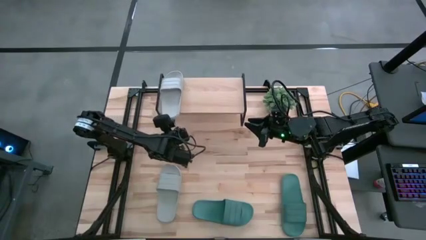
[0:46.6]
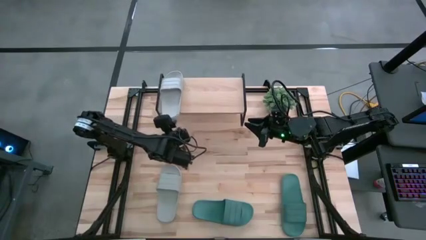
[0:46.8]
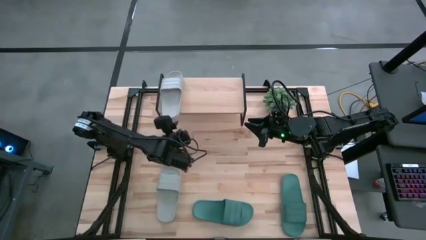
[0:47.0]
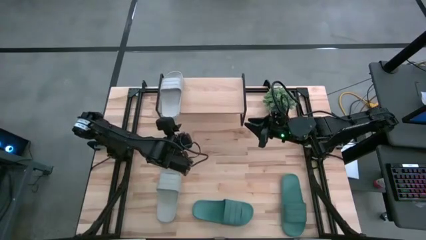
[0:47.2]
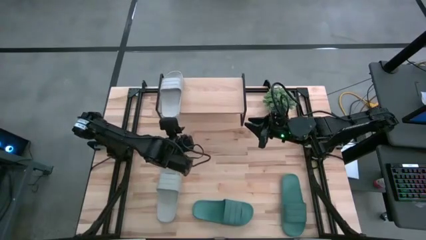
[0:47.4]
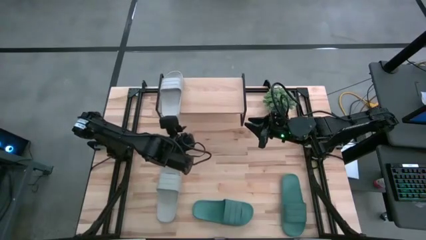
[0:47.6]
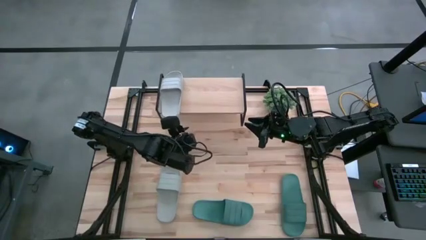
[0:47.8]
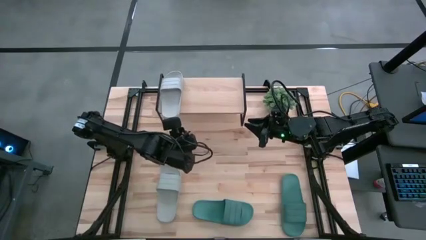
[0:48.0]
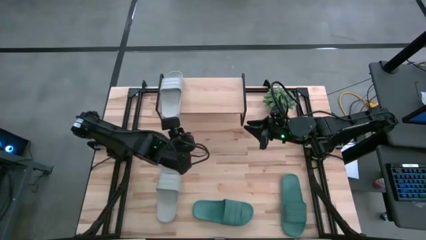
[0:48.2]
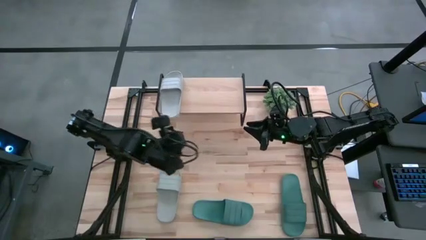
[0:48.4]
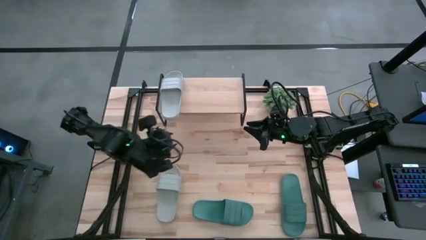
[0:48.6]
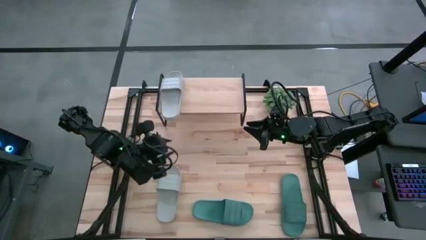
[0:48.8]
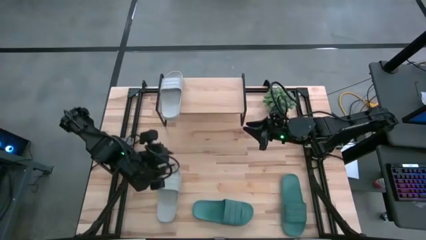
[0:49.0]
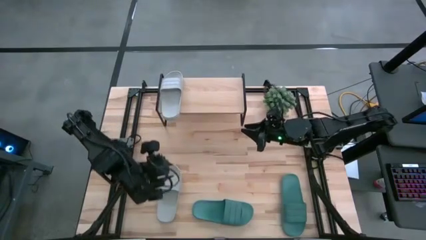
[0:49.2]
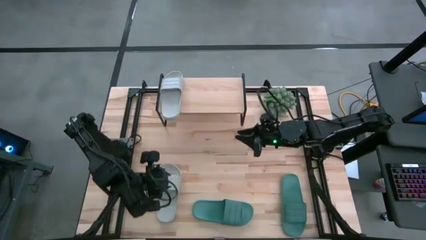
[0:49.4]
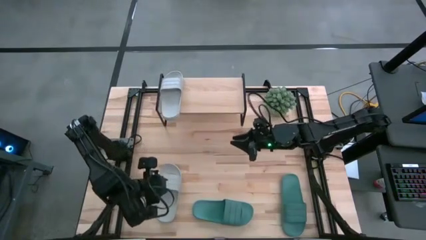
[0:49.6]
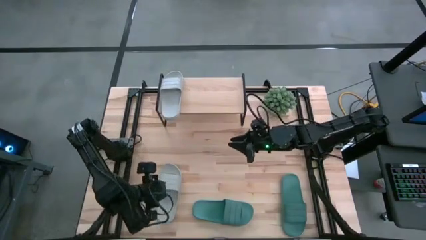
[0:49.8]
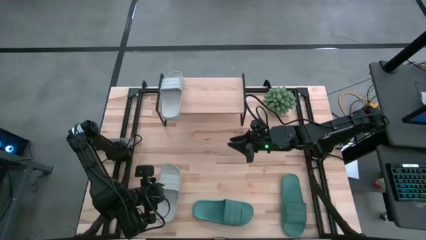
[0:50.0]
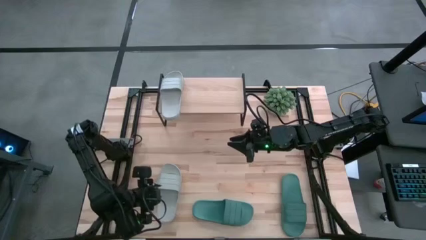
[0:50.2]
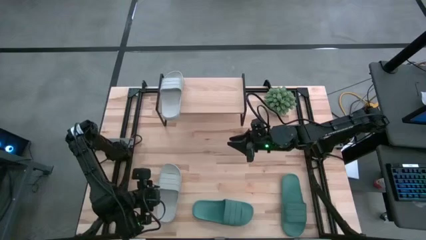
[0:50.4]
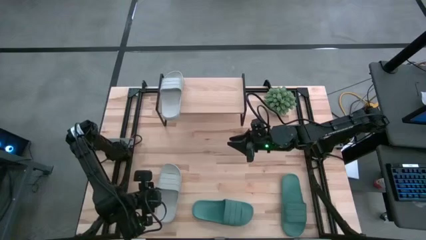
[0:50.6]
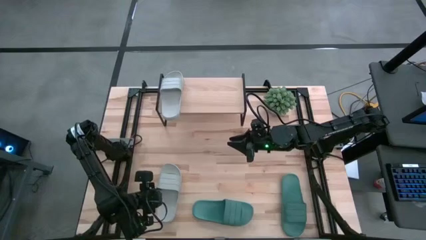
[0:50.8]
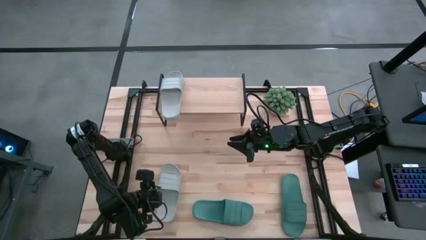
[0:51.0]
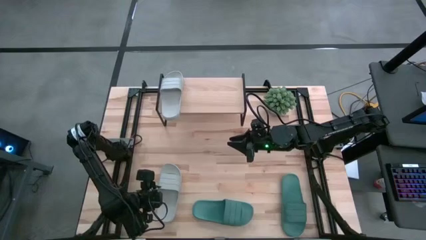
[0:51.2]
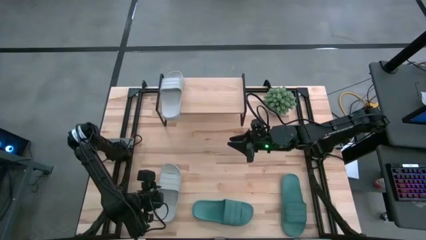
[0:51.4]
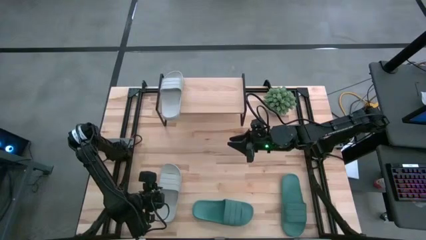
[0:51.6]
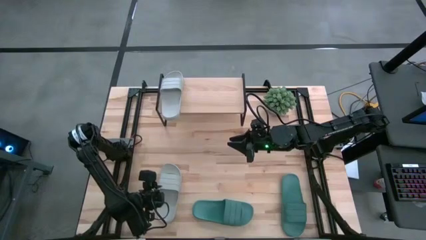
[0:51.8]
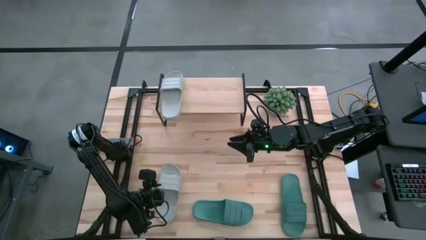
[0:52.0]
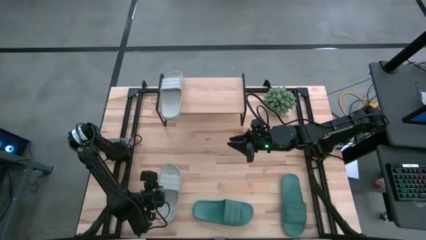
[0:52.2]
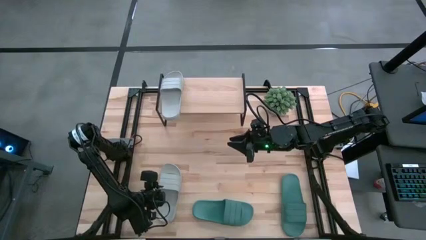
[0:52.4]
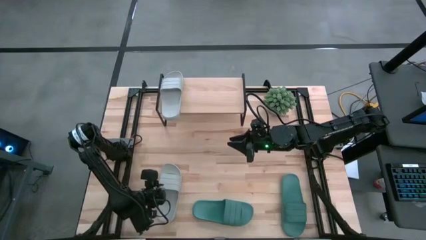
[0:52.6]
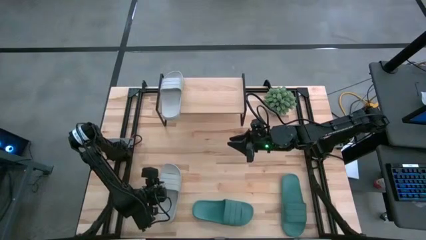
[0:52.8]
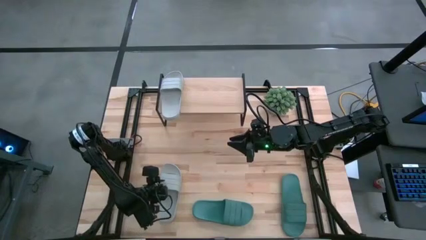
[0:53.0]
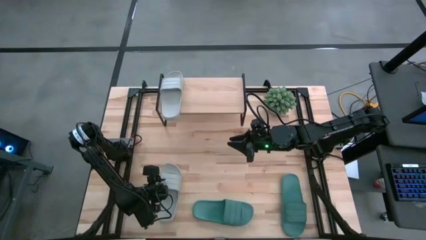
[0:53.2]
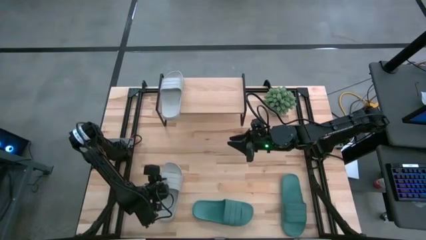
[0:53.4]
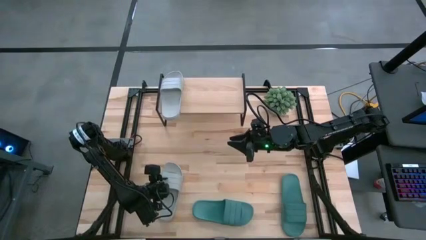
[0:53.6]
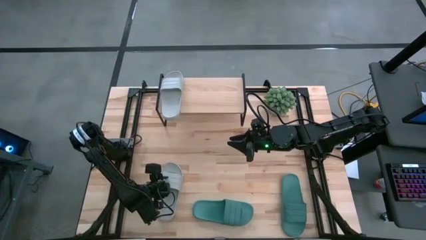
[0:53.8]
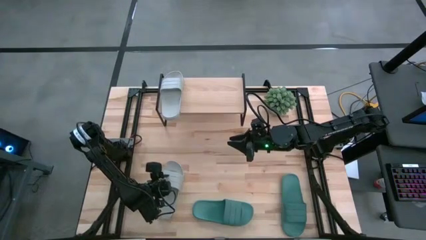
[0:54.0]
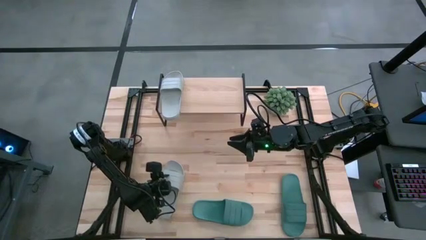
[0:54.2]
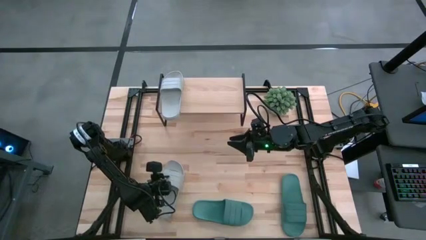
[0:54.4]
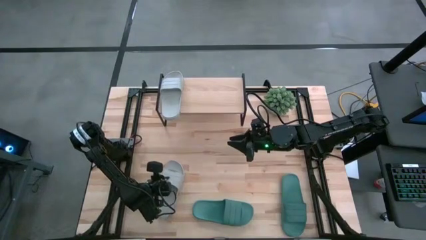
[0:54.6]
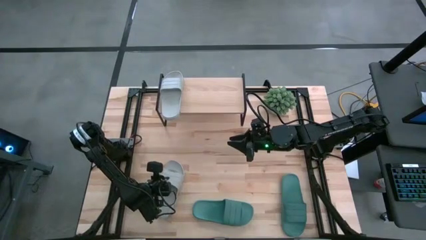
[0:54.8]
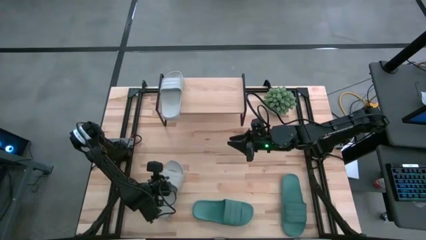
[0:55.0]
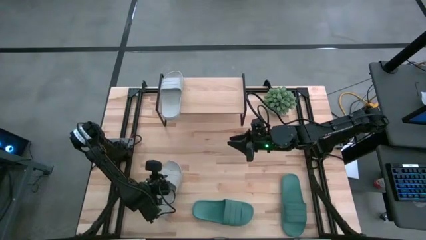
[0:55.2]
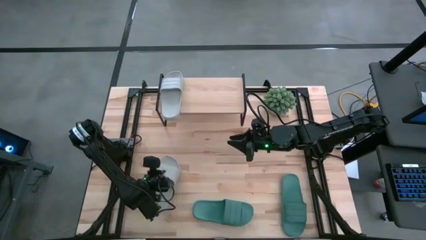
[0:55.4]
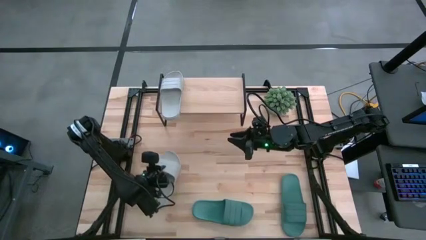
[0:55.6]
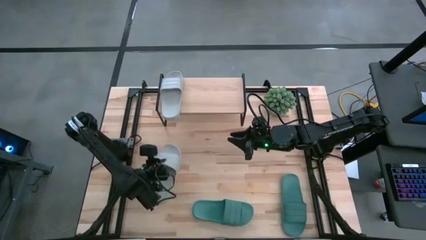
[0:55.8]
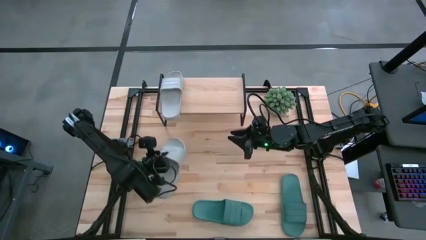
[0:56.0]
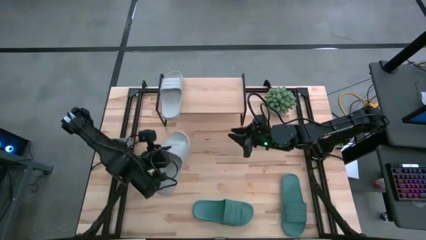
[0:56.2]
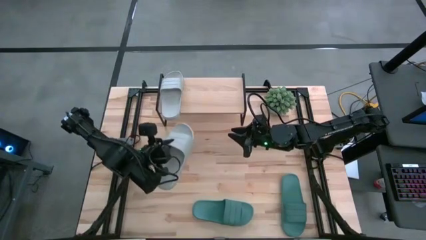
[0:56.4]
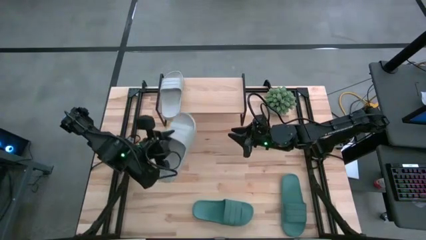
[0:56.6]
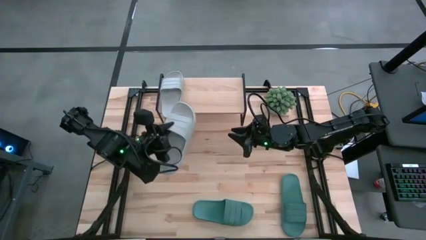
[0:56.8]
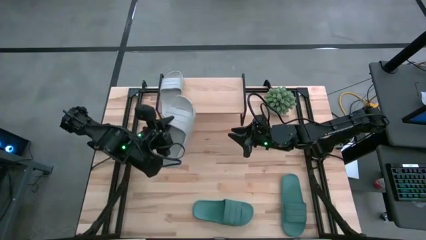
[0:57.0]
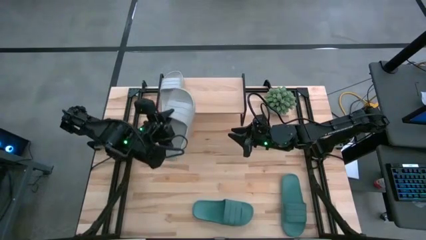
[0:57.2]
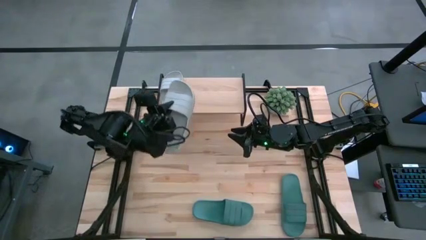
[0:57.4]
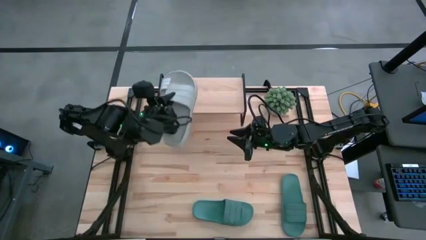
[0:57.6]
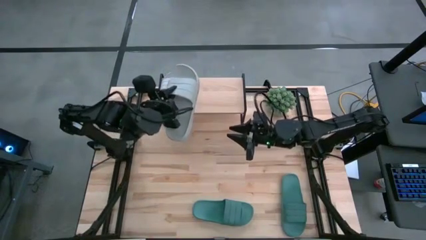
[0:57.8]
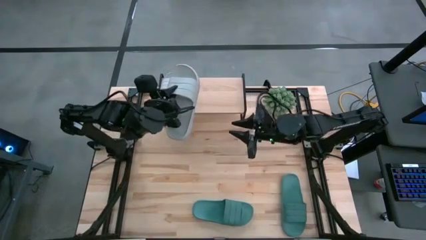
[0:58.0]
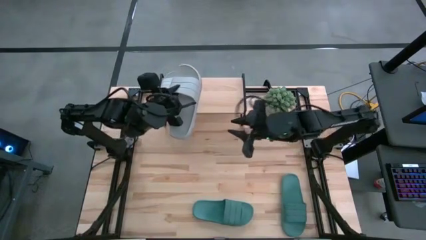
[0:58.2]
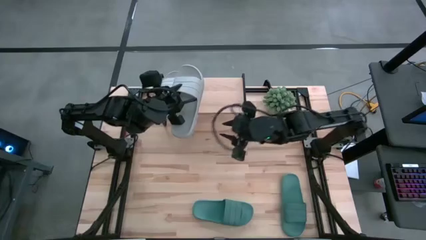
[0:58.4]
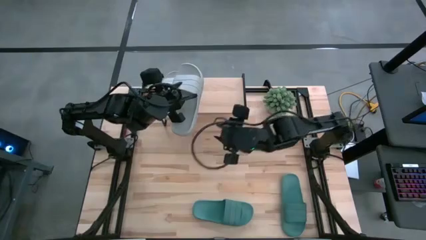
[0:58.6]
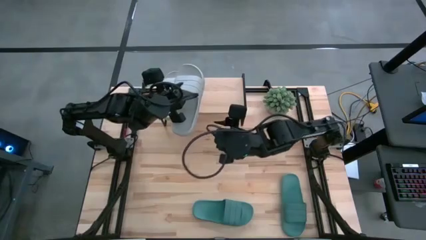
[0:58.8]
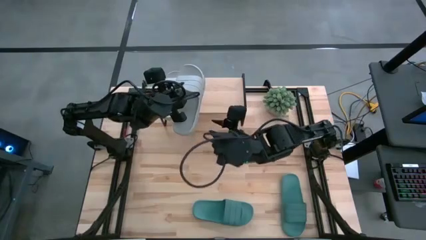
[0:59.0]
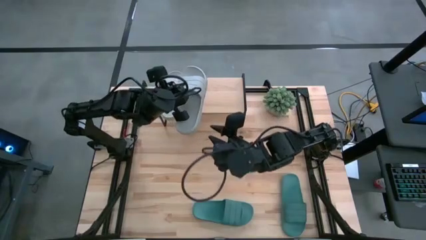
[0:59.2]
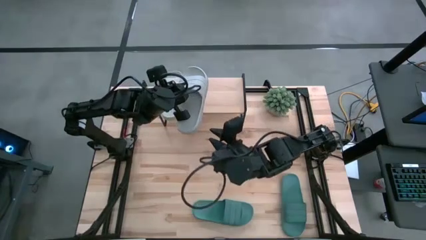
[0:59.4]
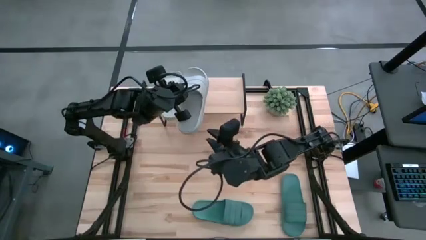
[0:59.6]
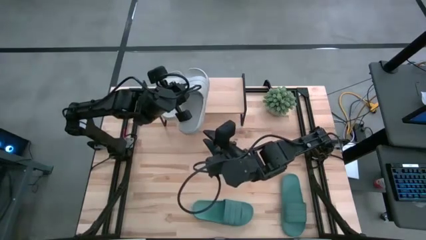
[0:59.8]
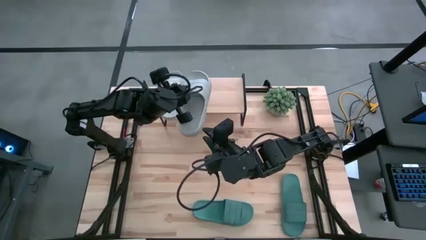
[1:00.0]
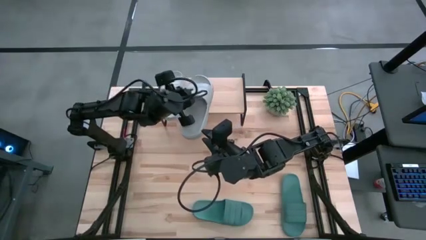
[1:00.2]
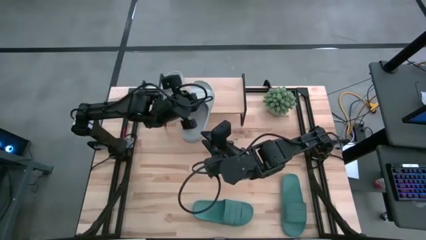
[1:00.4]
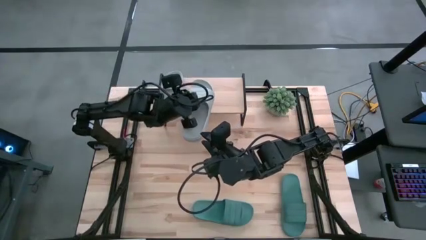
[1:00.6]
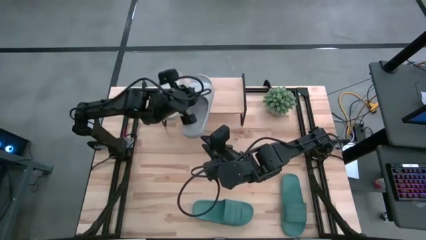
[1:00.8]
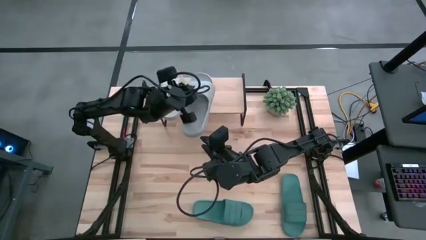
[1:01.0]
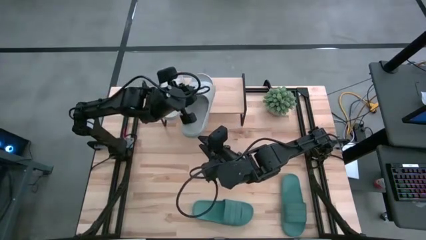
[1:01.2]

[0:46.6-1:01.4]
Task: Pick and place slides into the shelf
Put the gray slipper on the shelf
